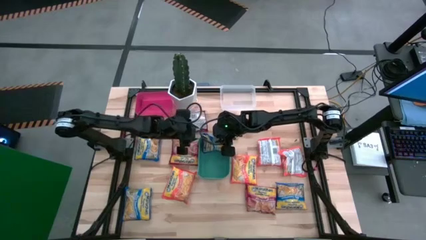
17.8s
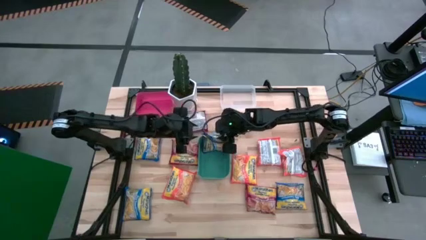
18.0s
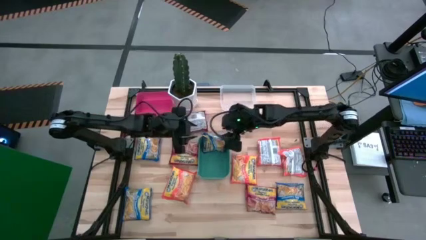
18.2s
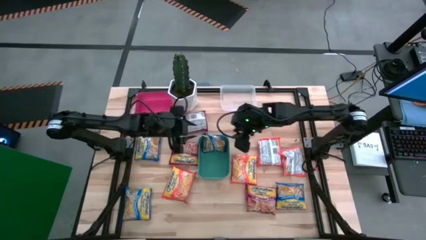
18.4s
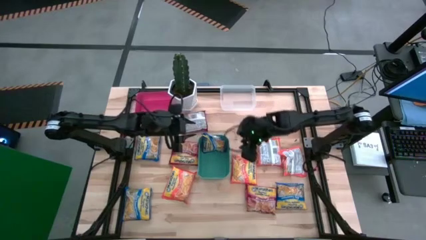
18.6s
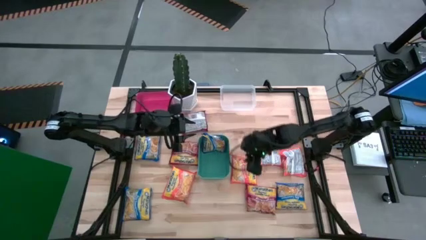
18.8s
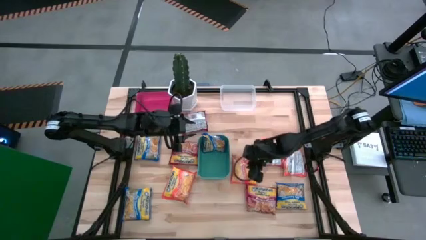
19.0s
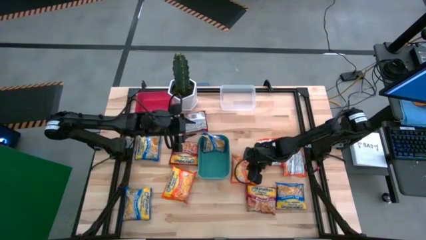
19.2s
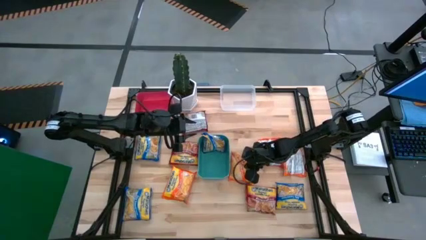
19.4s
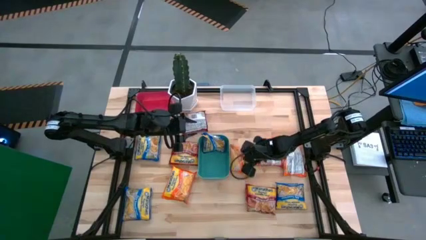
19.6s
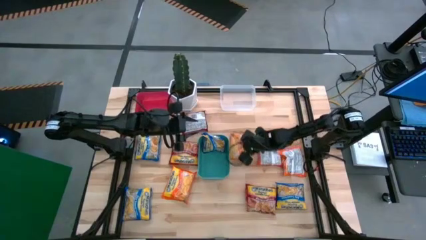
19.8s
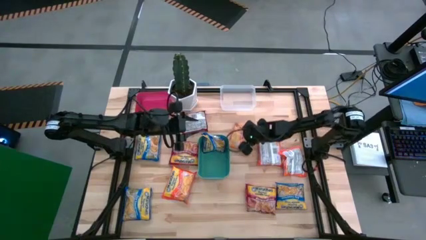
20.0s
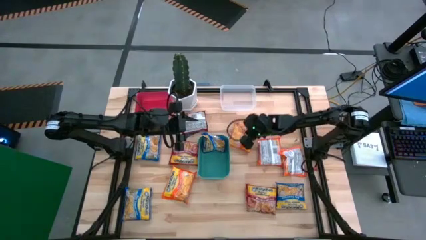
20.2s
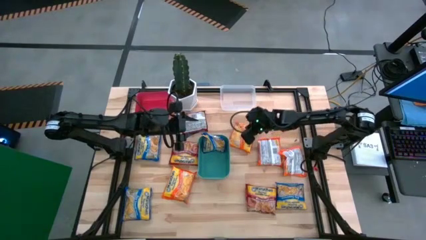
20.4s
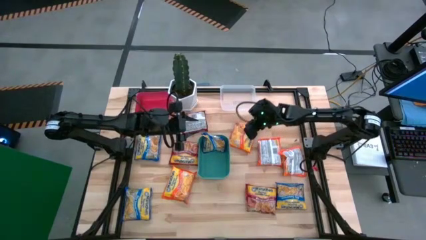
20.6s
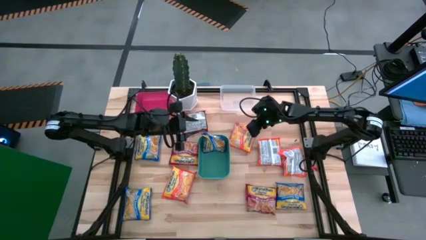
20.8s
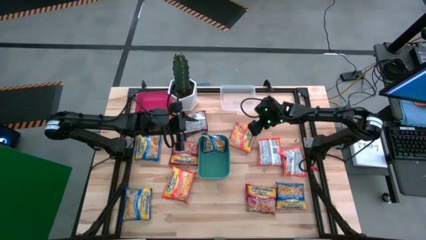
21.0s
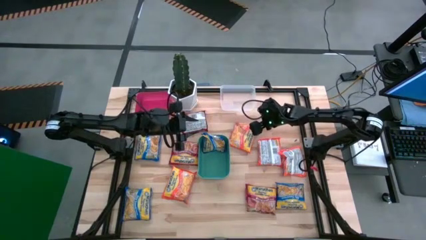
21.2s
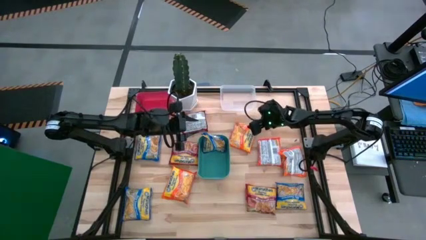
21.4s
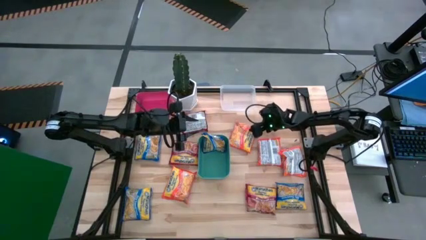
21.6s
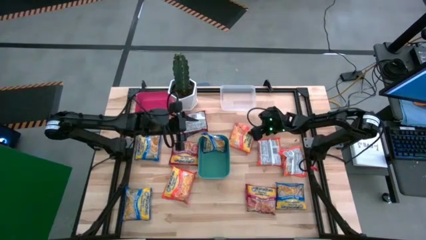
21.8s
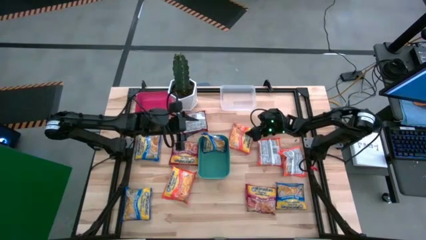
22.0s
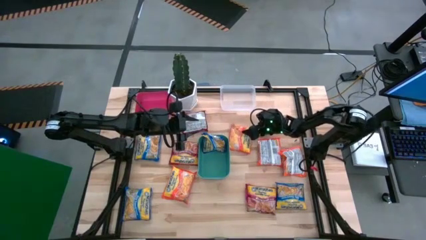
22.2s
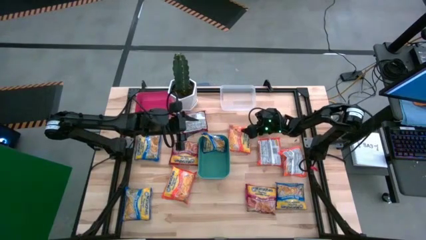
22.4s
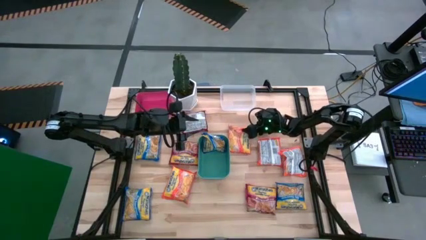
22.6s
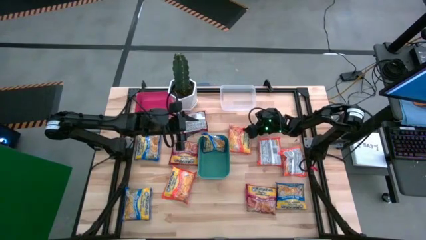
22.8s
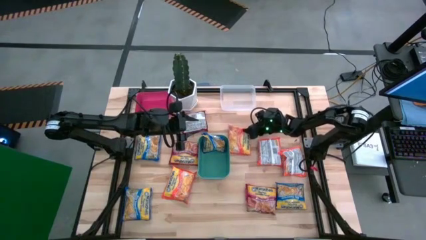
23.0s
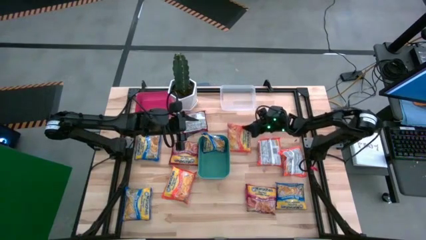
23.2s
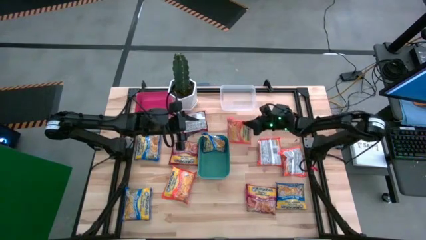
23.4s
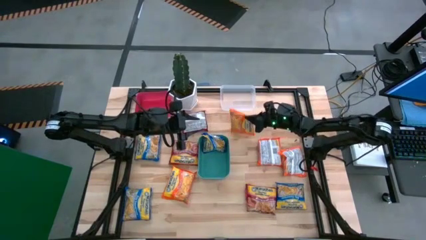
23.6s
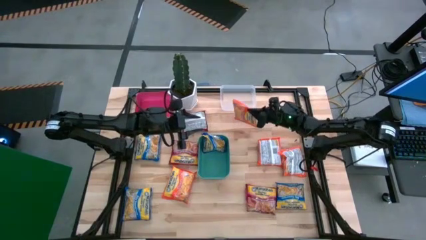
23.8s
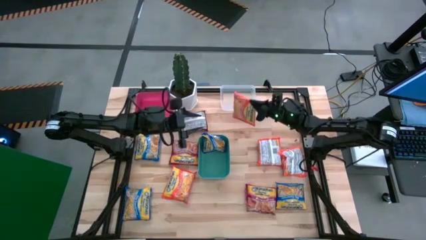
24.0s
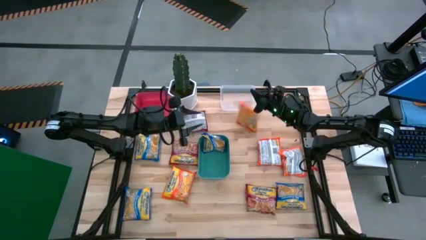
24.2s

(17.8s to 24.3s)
Task: Sort Maruchan noodles
Put the orange noodle pack into the transparent bin

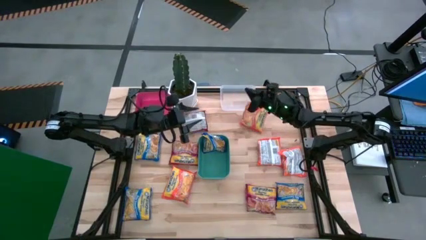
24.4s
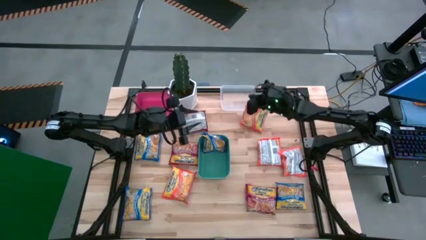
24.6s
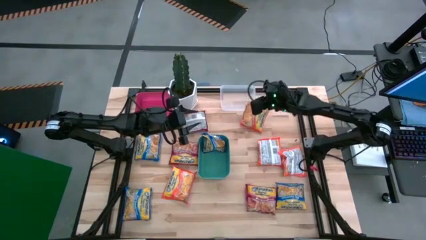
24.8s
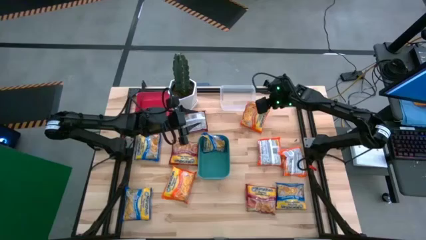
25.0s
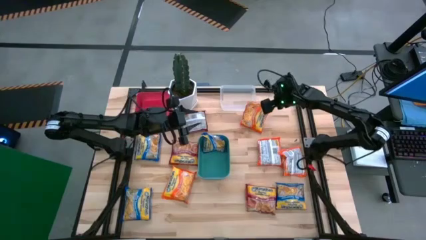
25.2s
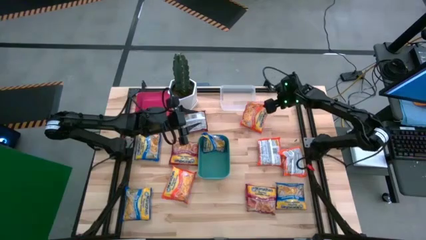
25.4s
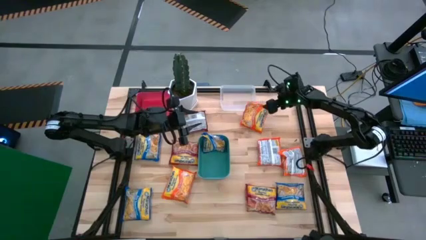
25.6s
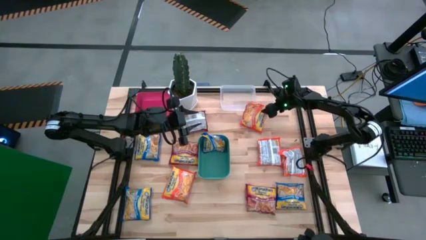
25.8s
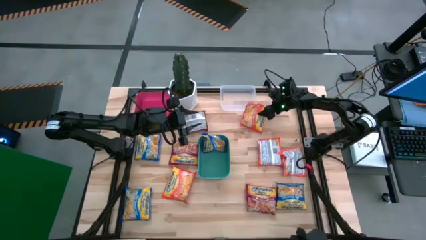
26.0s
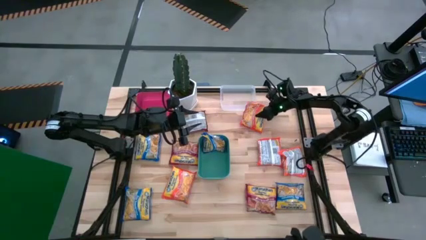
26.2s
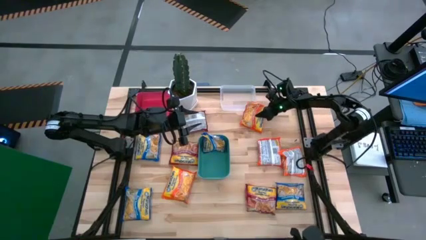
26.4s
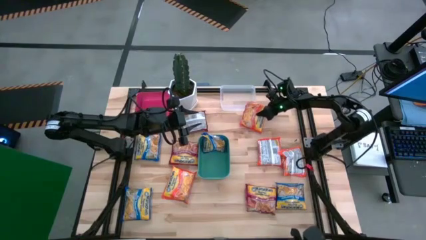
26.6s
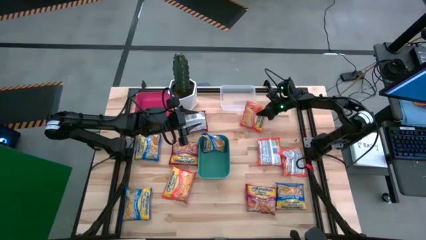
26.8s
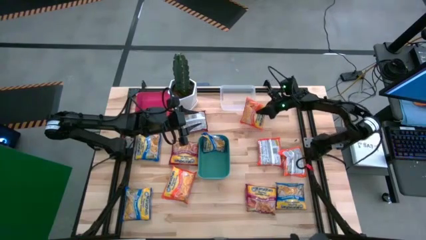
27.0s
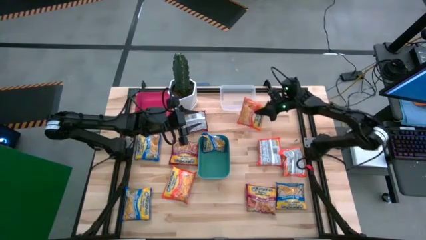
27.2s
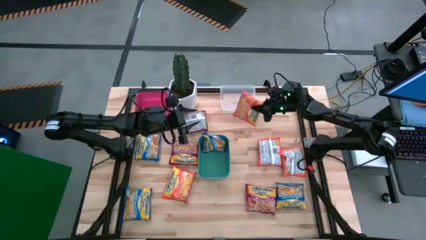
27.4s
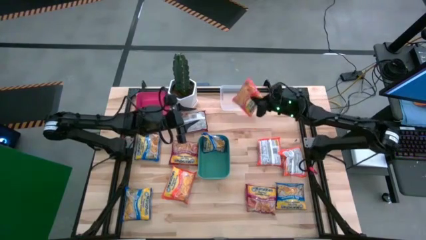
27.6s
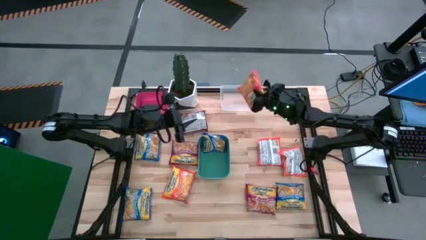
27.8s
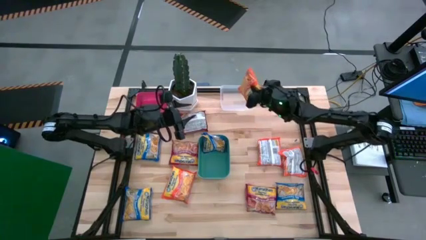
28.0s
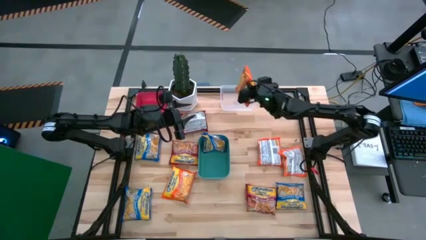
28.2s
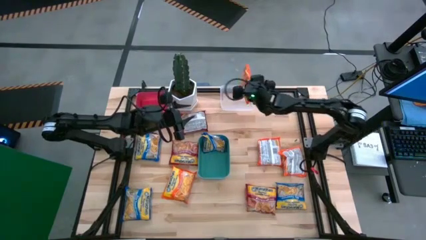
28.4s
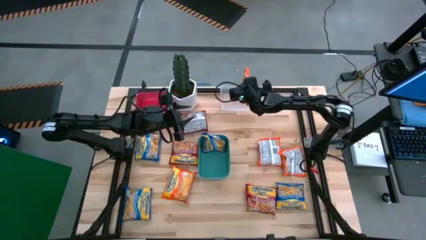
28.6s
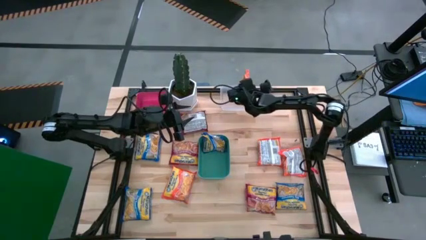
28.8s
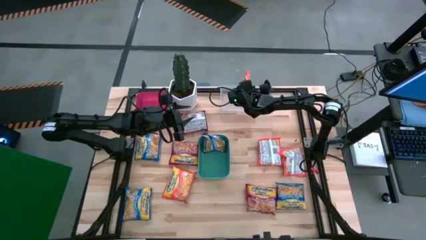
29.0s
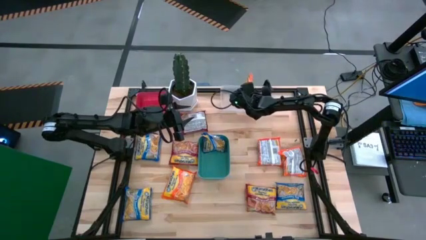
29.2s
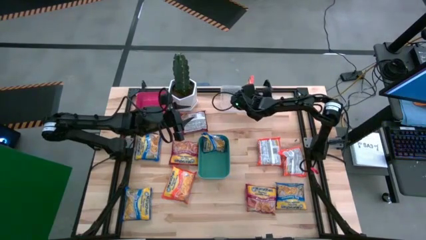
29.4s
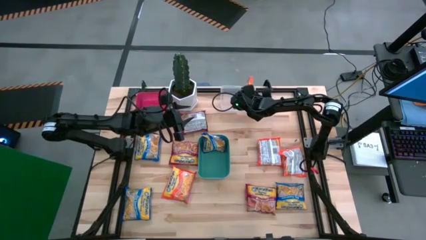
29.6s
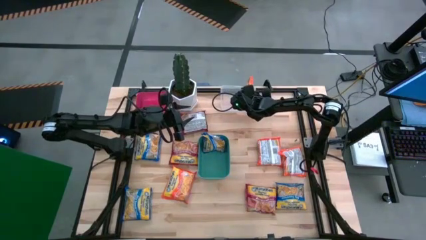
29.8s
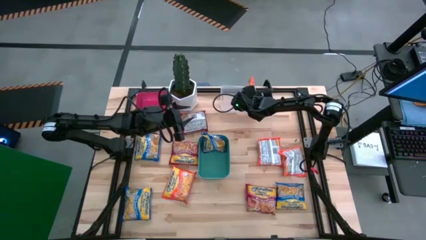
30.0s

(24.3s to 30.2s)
Put the orange noodle pack into the transparent bin

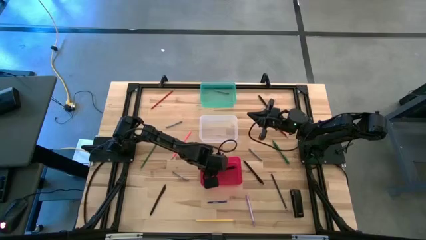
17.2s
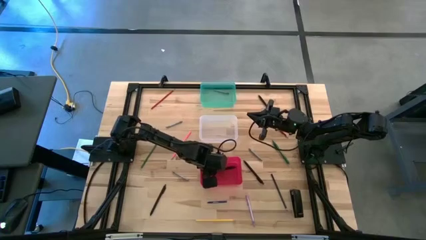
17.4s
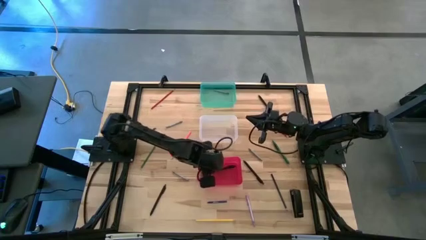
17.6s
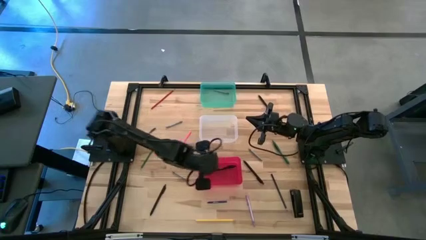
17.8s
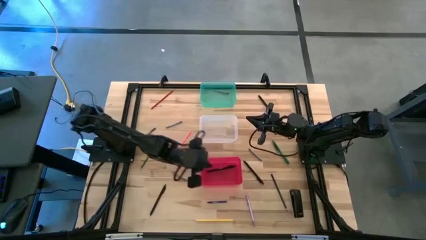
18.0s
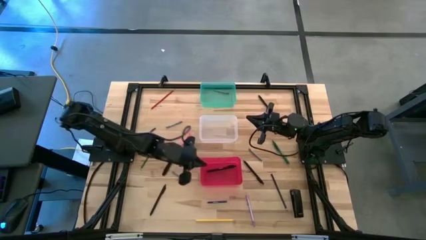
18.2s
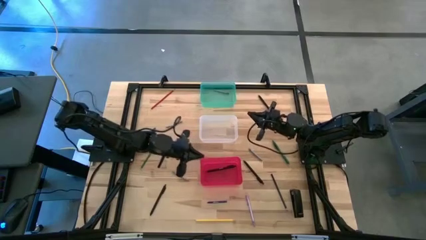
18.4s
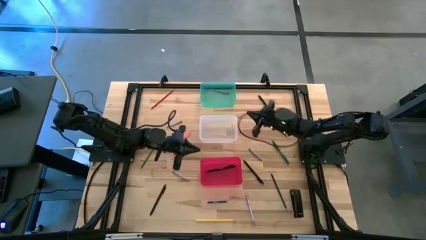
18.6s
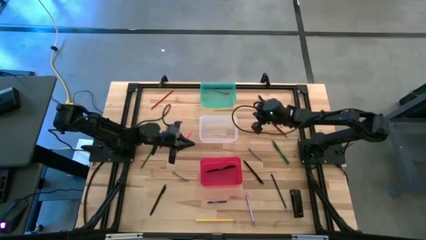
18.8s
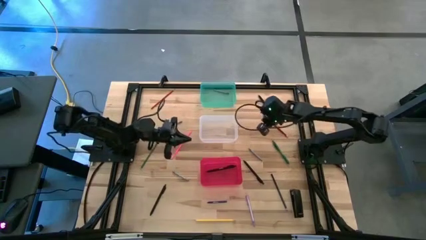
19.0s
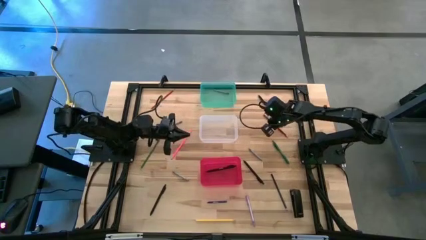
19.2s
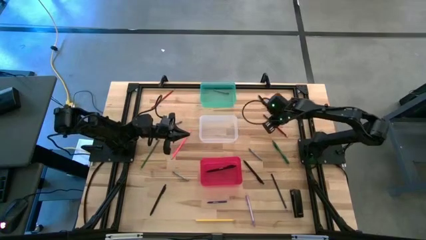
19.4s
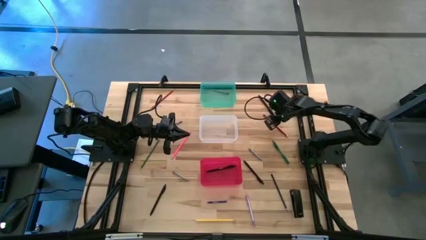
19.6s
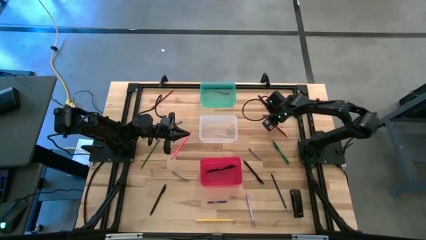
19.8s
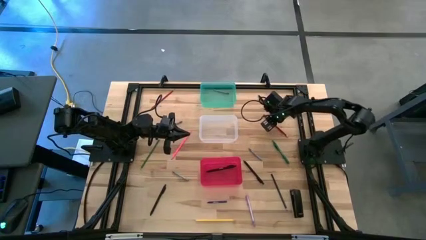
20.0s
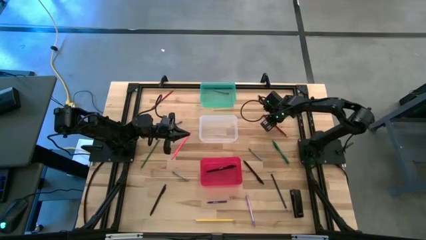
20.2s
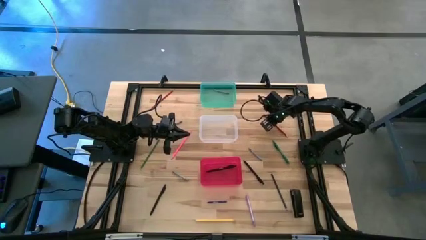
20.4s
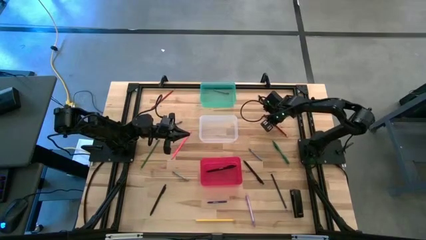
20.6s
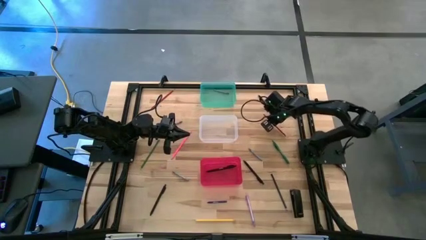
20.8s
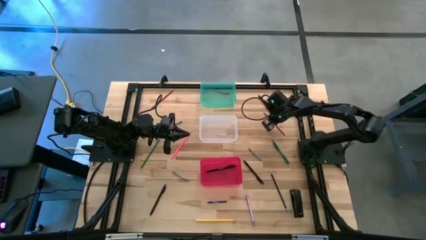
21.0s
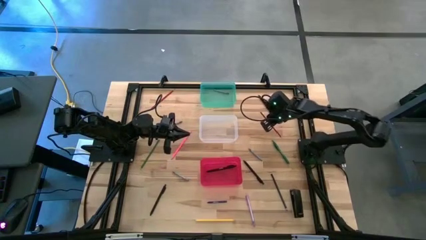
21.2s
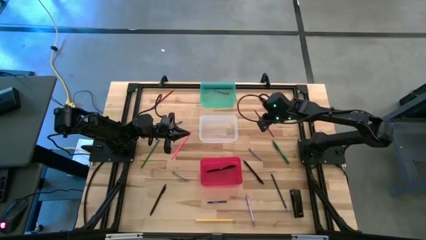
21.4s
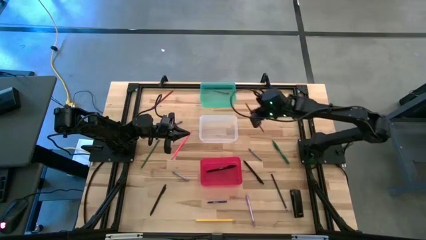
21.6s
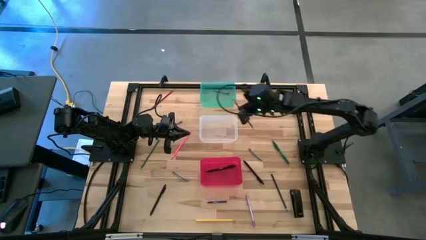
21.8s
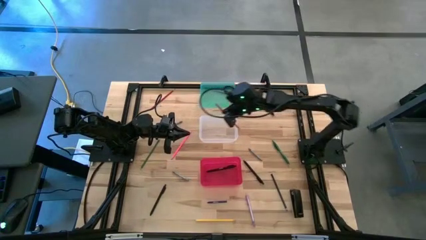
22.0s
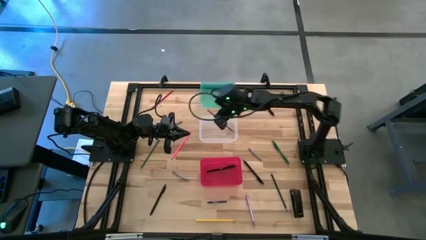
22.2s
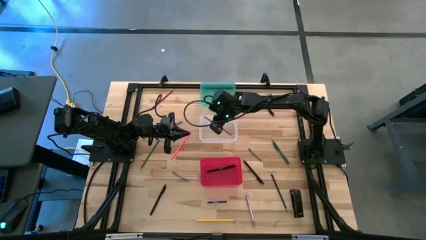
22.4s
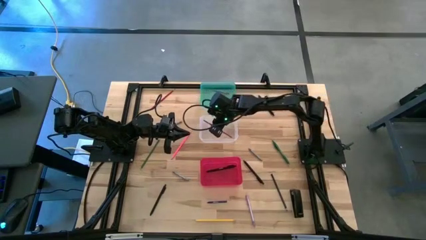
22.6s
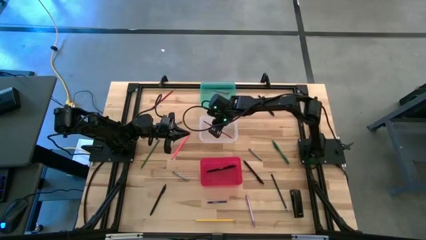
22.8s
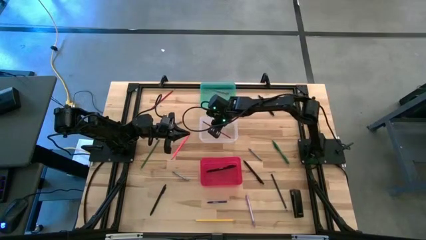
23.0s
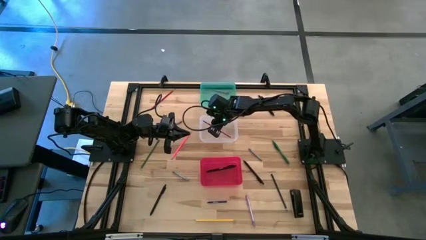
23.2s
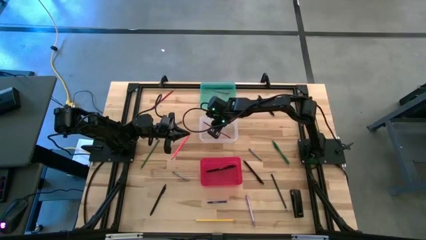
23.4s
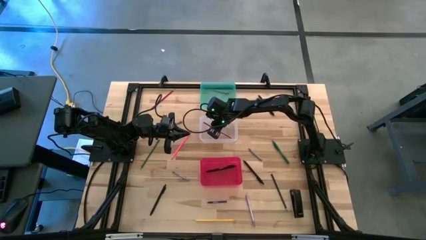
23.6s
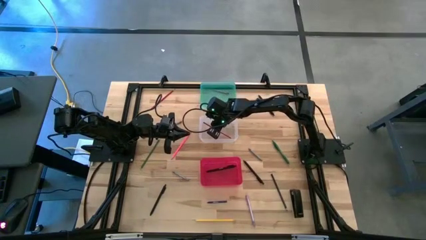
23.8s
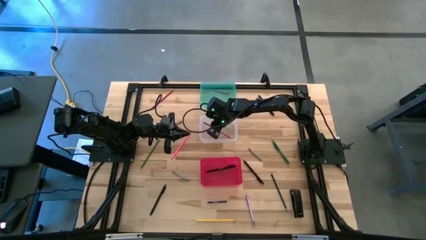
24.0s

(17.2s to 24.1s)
Task: Sort crayons/erasers/pens/pencils in bins
Put the right red pencil into the transparent bin
